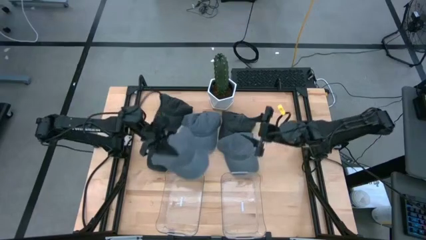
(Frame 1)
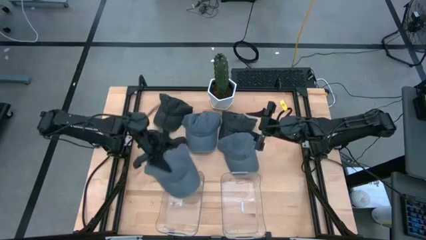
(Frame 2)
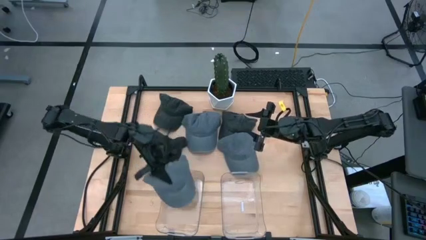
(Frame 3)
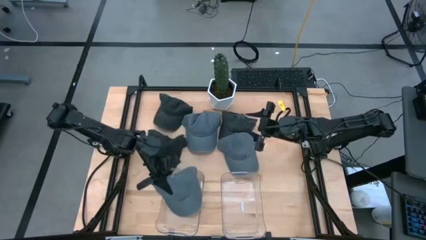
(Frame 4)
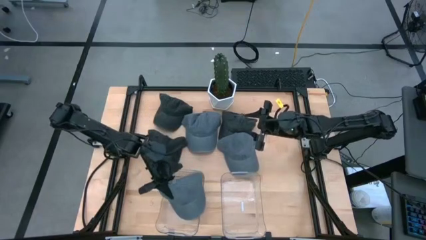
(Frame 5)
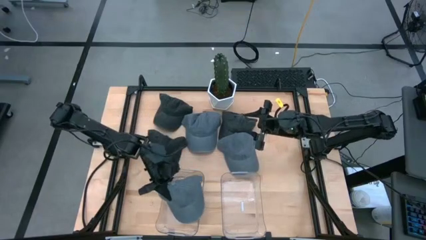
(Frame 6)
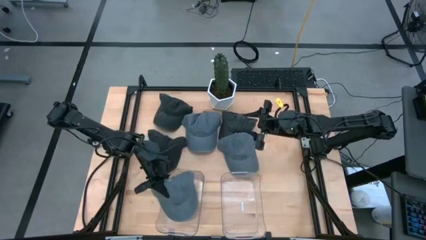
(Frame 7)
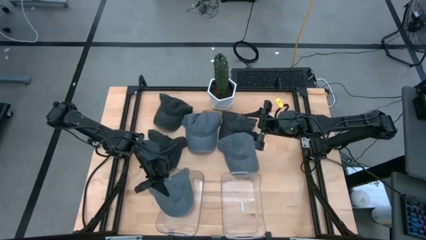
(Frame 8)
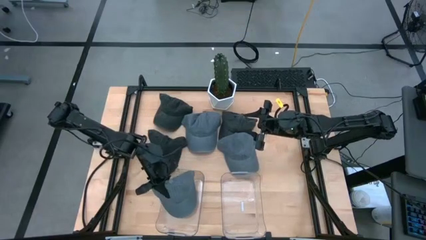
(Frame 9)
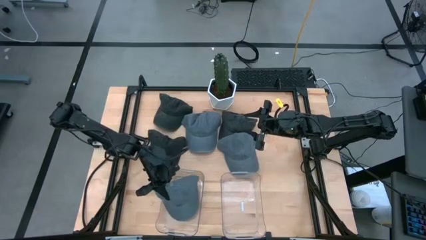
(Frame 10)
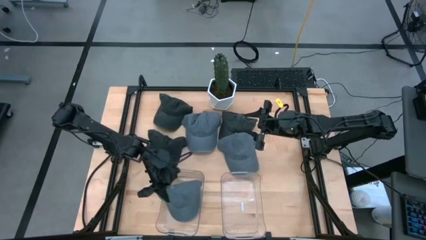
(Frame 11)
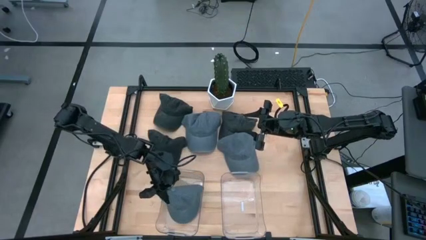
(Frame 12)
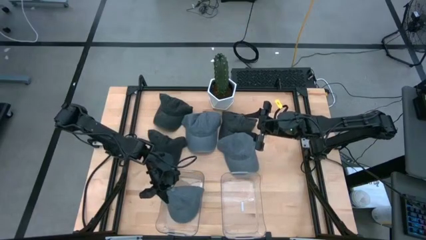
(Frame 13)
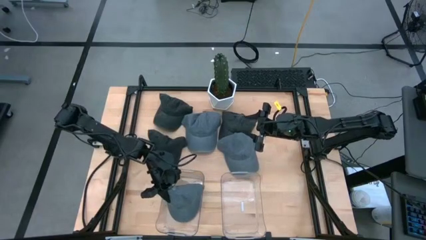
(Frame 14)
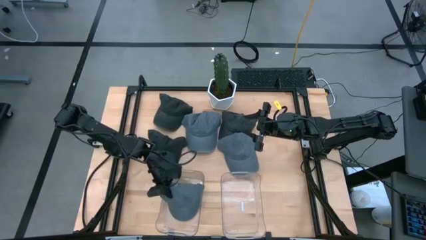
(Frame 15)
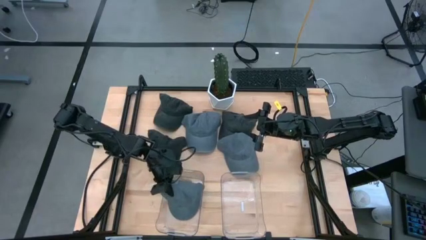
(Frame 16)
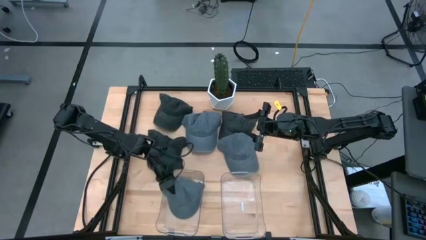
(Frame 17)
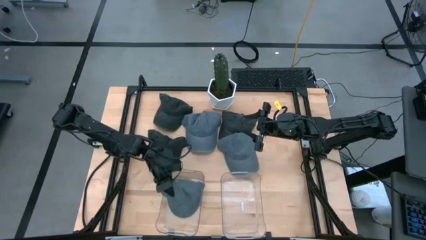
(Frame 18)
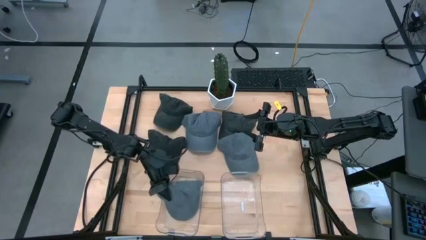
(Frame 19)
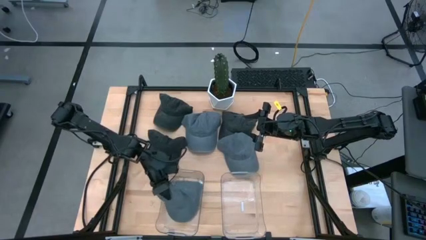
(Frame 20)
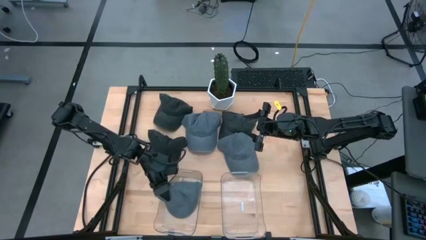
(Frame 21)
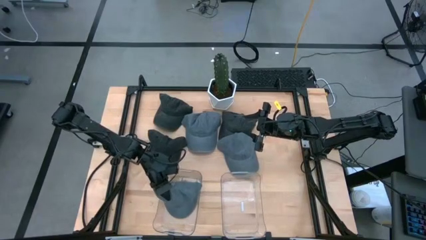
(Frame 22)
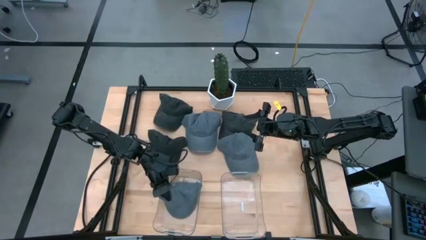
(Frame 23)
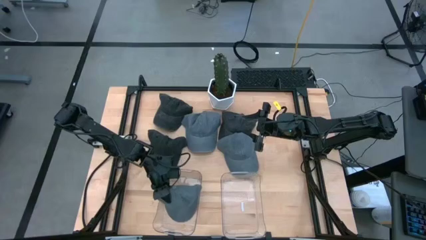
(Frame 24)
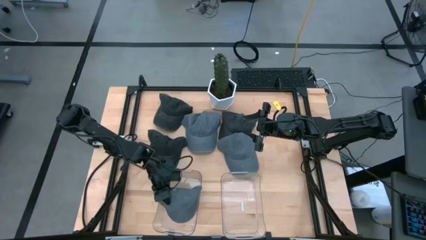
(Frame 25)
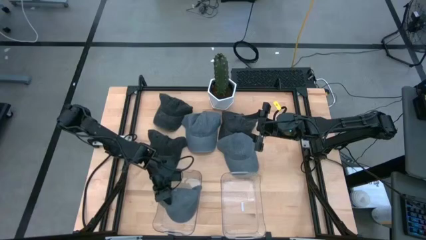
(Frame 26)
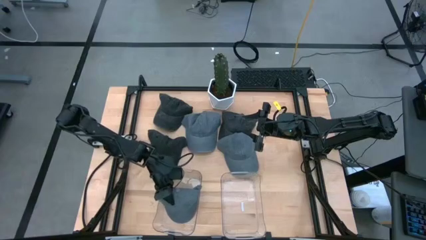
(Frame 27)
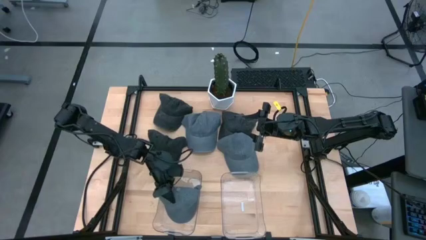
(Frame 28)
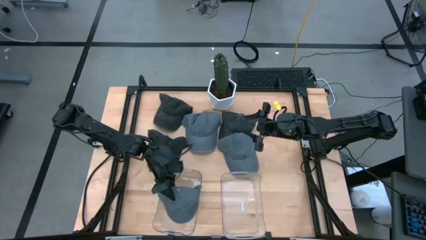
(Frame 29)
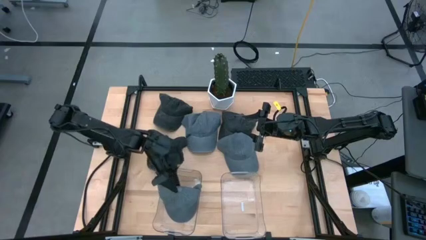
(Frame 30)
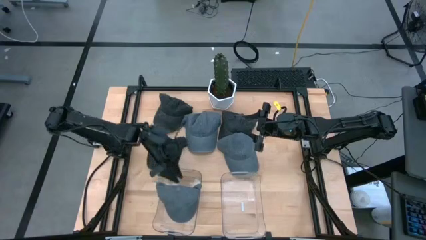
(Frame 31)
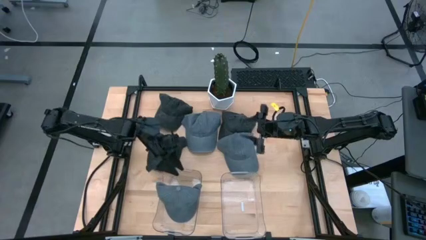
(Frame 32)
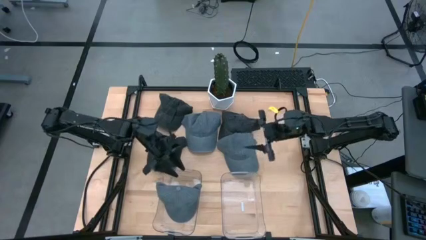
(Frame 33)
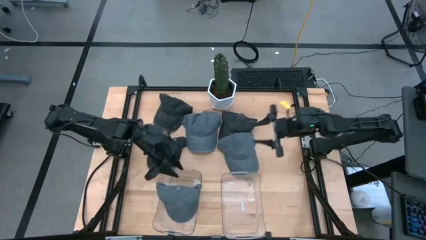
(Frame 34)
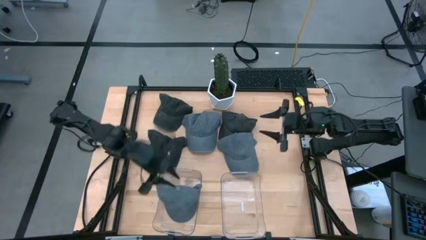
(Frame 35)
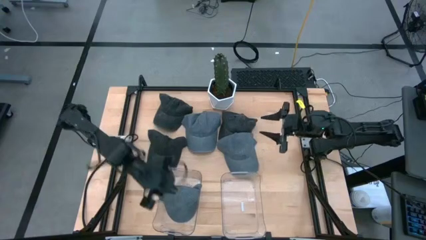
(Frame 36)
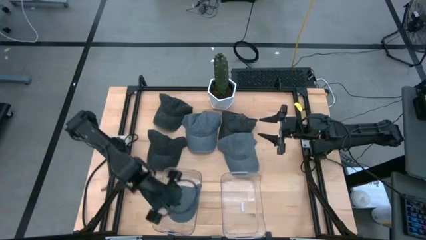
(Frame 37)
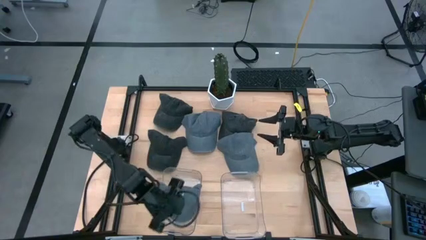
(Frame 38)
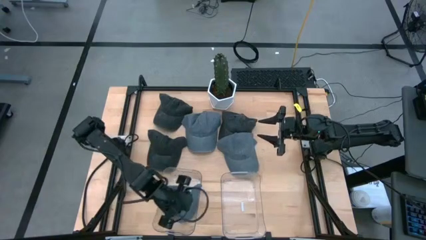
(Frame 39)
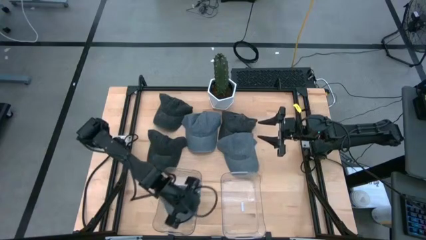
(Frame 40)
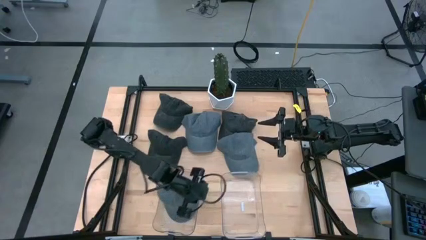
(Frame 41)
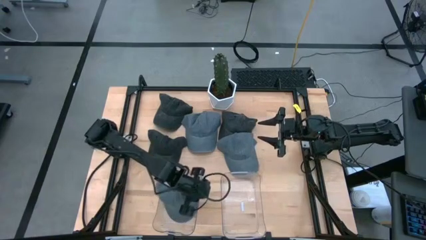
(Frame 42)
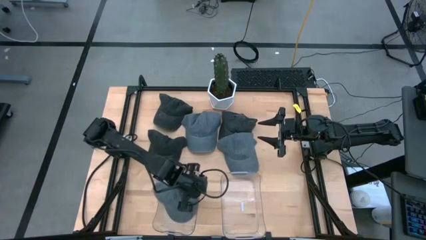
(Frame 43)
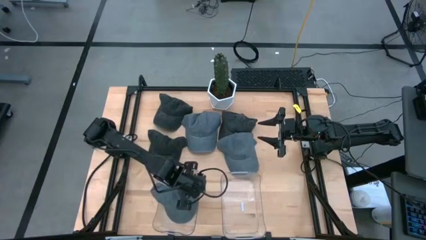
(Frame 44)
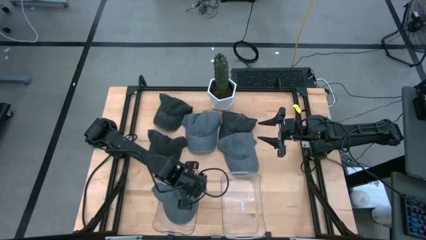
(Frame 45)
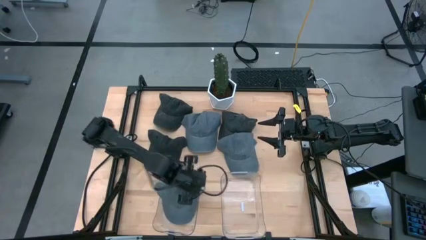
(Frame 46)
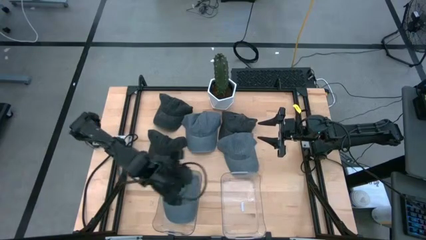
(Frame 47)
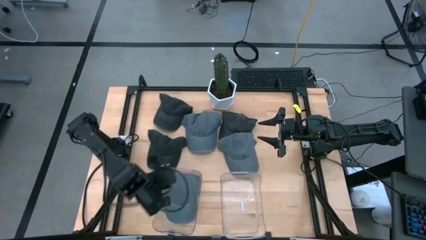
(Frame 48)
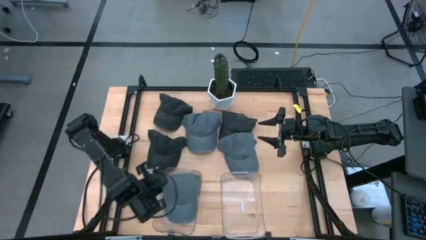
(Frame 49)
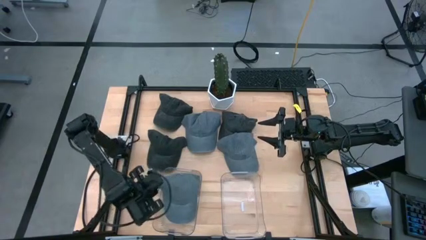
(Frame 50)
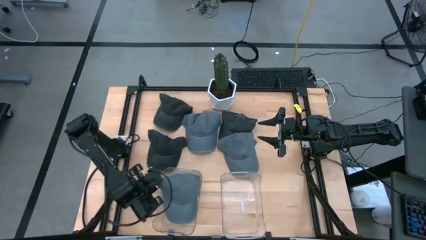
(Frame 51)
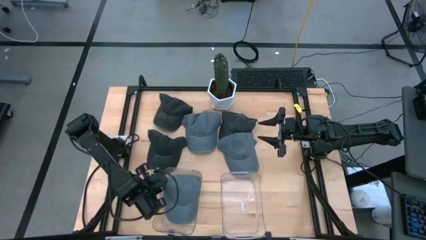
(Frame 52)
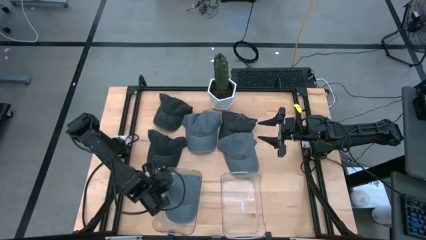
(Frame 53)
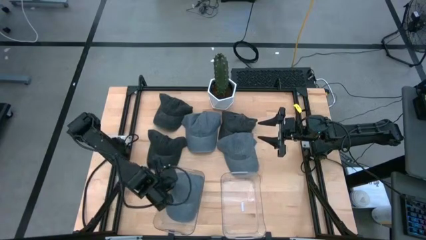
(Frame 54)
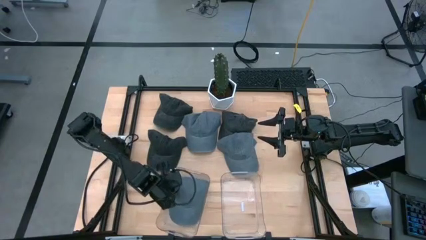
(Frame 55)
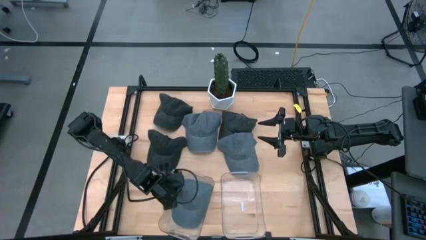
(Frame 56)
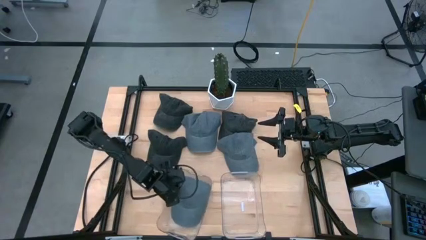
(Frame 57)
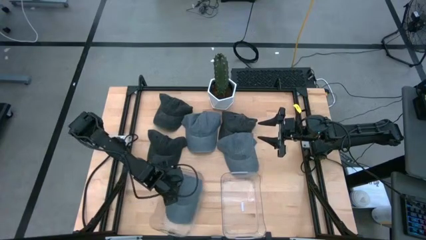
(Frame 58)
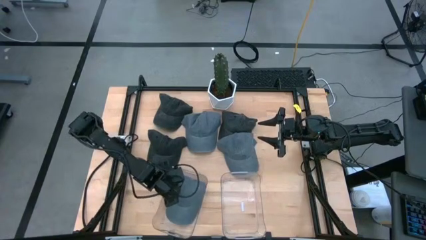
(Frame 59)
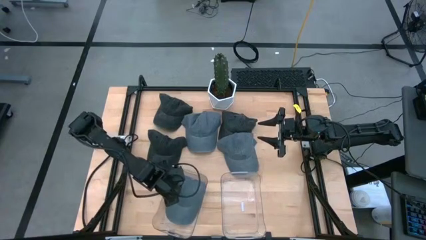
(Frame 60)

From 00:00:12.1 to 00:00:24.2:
Task: Pick & Place hat
Put the top right gray cap into the left transparent bin

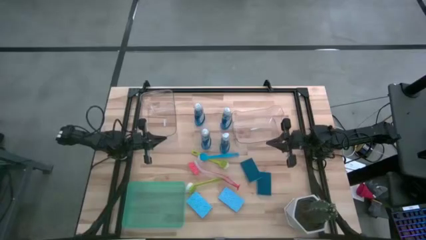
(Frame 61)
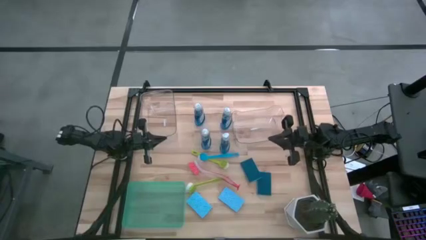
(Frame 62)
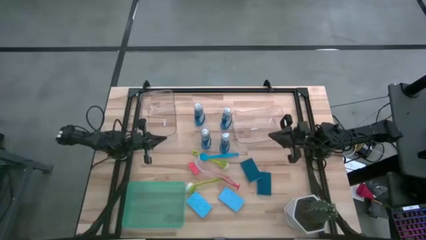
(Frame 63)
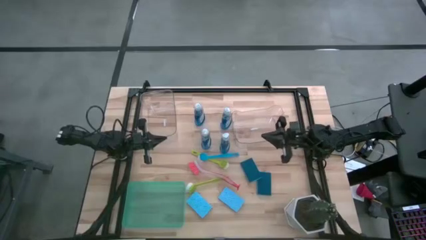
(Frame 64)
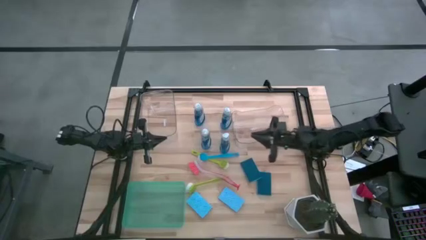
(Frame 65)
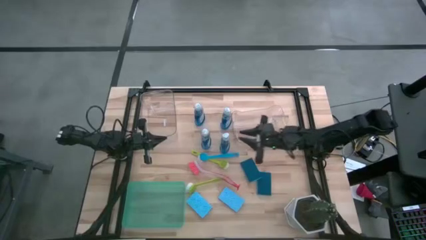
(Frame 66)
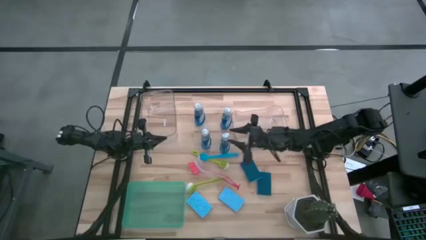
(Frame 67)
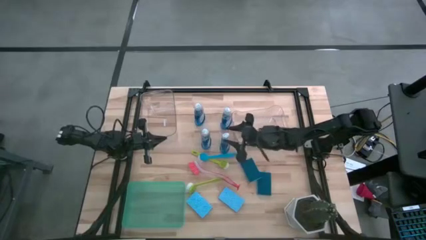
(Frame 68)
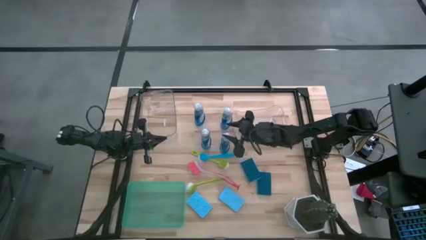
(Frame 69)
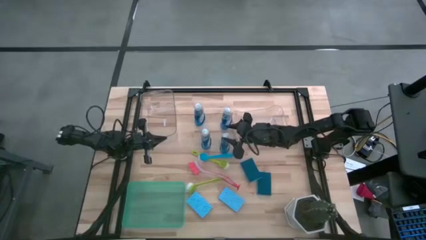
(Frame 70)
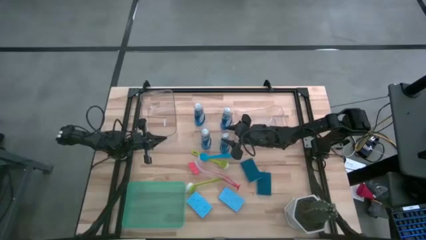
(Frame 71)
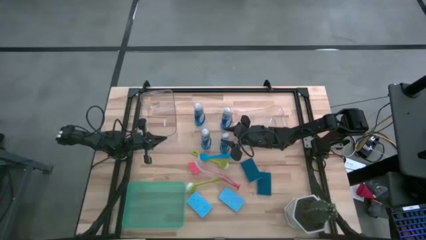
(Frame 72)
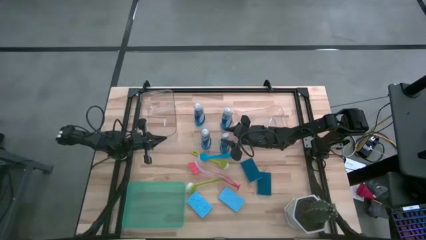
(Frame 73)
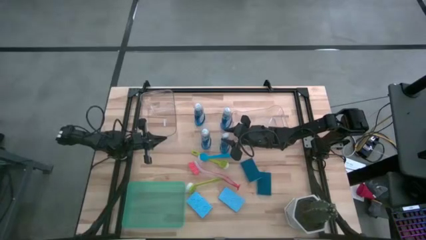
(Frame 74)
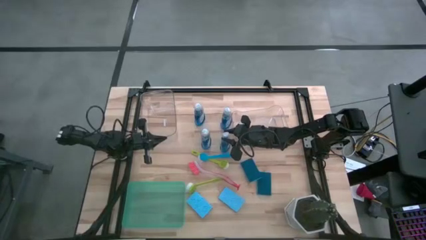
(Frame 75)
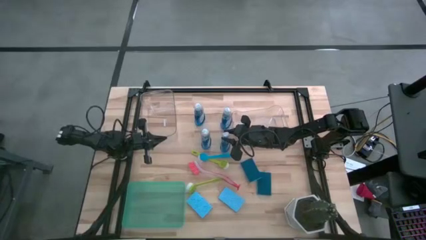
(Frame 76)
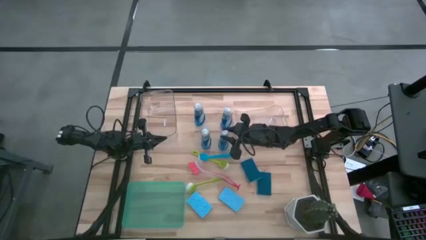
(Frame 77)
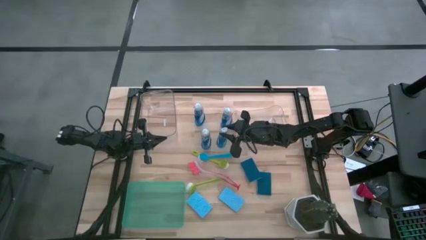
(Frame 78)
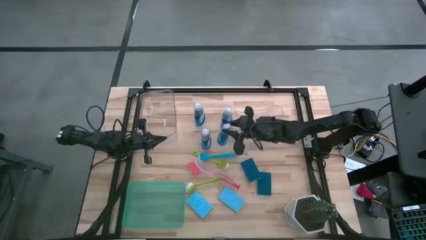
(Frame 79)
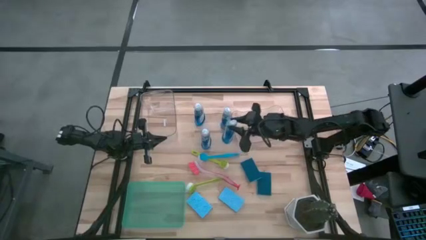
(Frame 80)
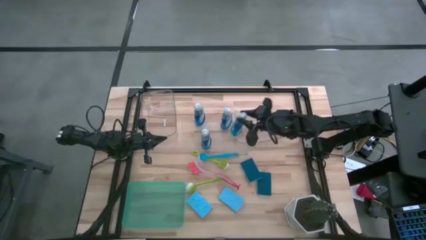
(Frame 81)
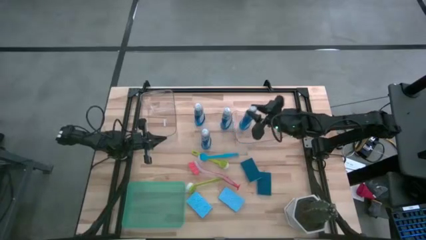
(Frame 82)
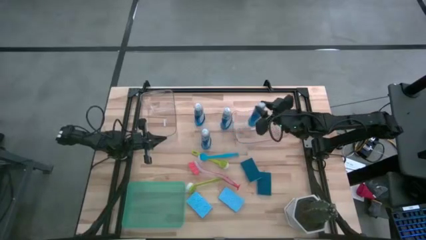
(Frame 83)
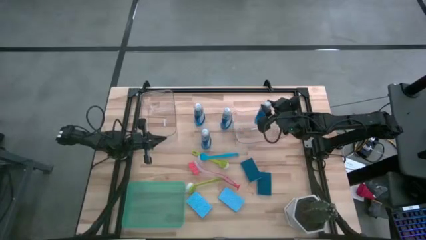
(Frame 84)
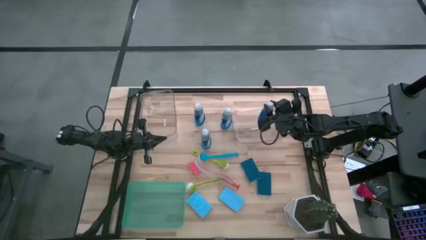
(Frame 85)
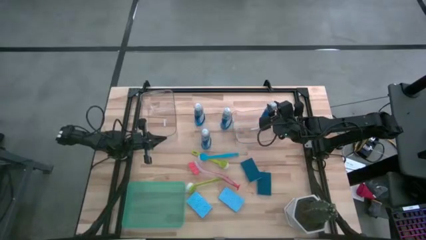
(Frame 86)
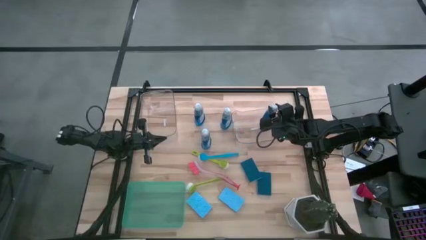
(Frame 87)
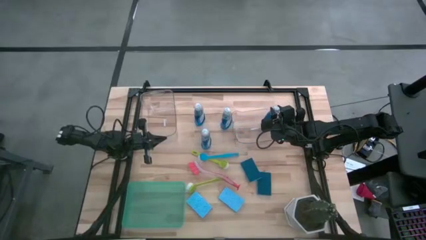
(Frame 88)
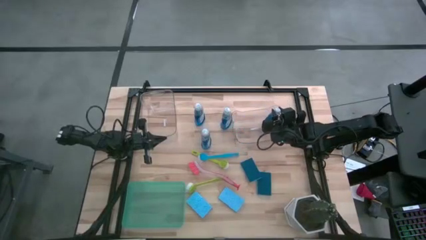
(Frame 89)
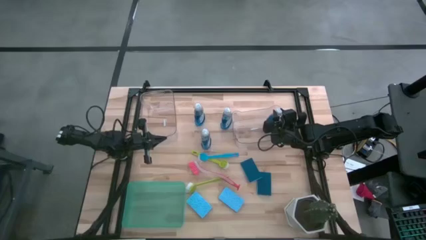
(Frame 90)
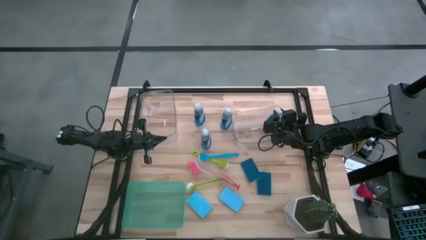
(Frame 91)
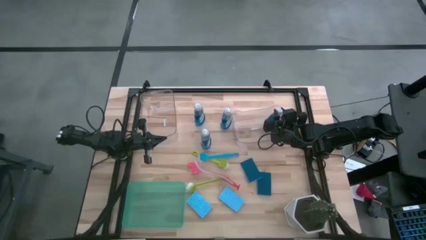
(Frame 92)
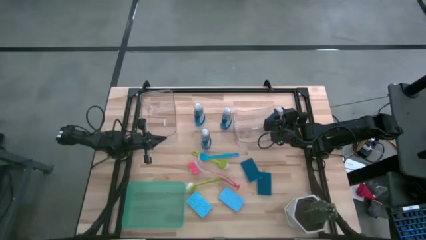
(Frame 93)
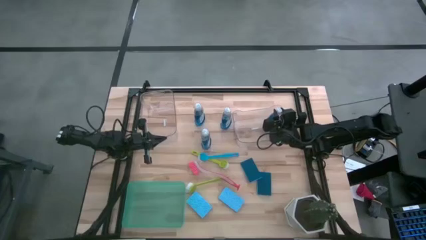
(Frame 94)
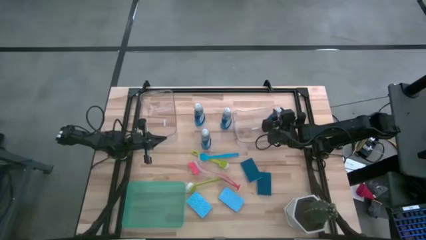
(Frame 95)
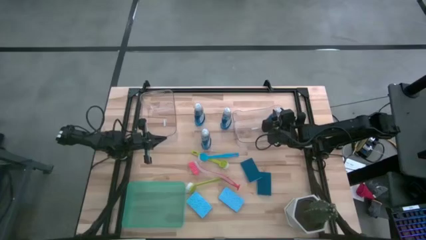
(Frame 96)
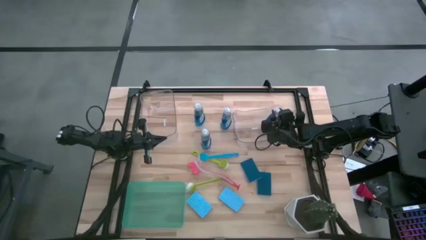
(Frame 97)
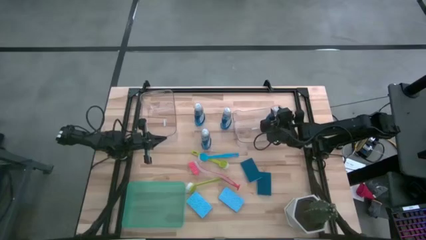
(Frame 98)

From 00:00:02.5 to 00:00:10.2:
Task: Pick & Place Kitchen Sink Supplies
Put the soap dispenser into the right transparent bin
